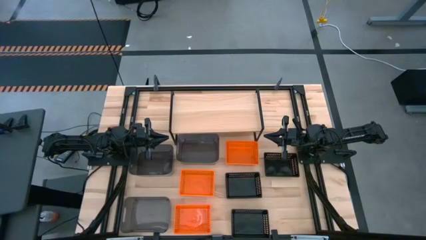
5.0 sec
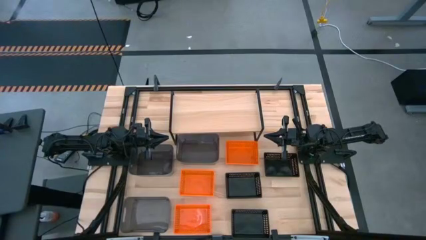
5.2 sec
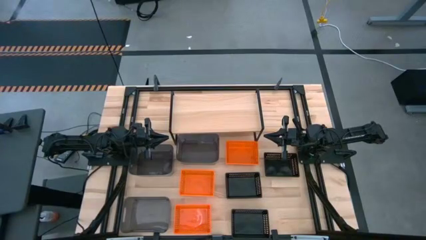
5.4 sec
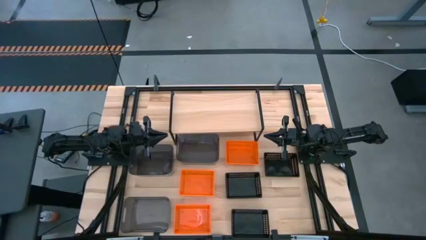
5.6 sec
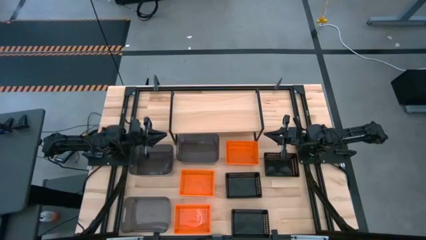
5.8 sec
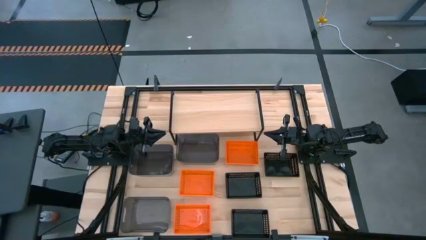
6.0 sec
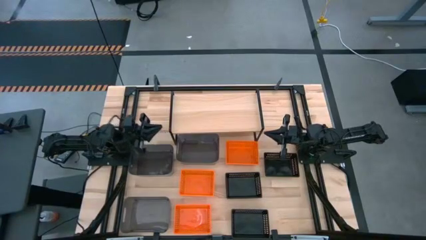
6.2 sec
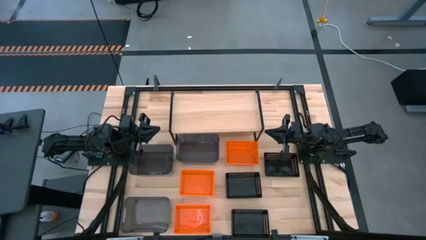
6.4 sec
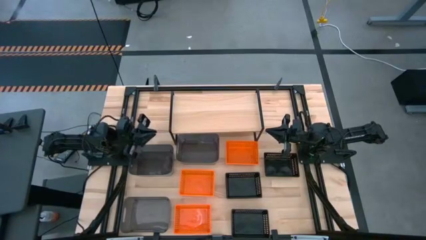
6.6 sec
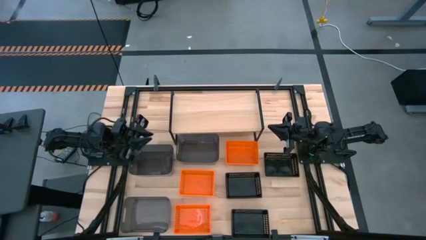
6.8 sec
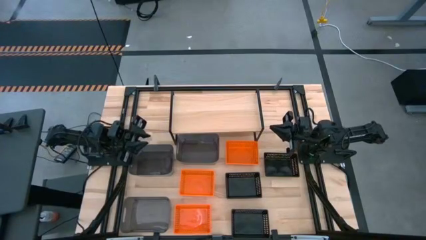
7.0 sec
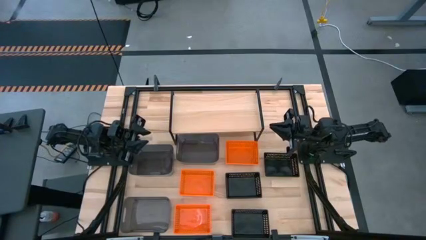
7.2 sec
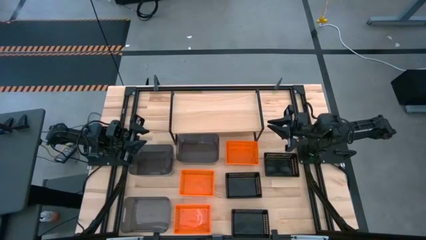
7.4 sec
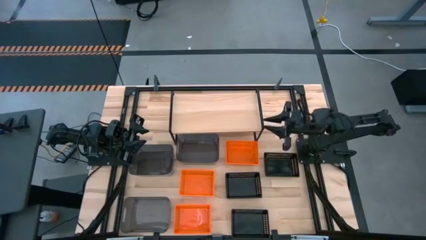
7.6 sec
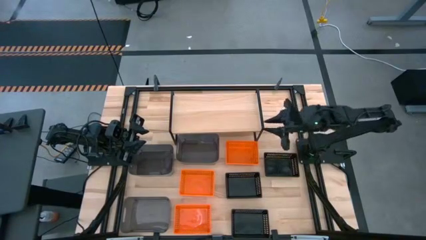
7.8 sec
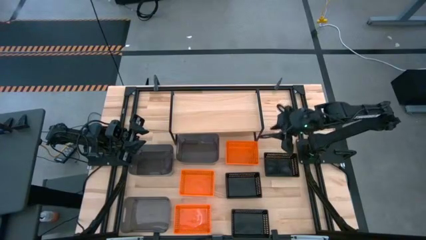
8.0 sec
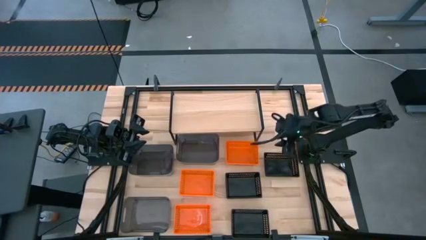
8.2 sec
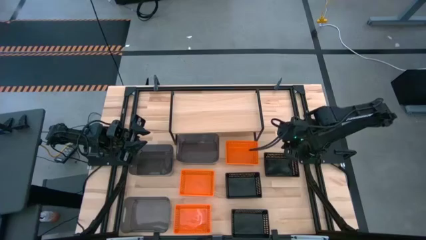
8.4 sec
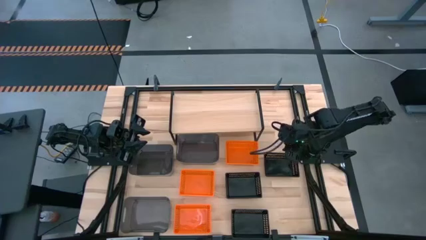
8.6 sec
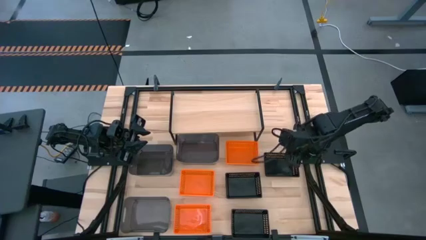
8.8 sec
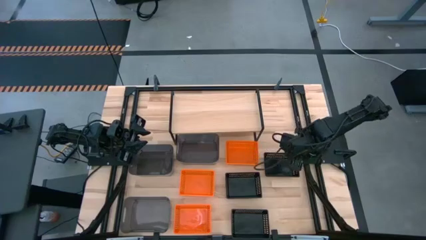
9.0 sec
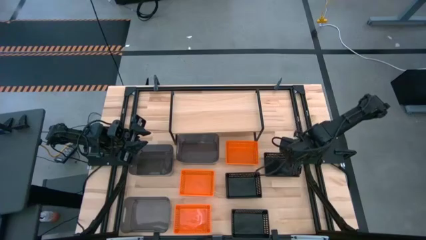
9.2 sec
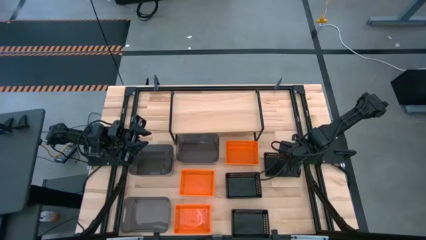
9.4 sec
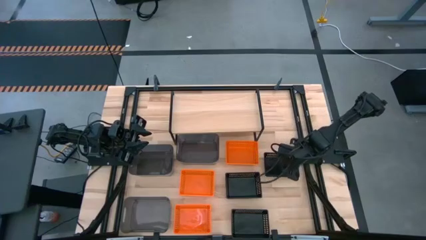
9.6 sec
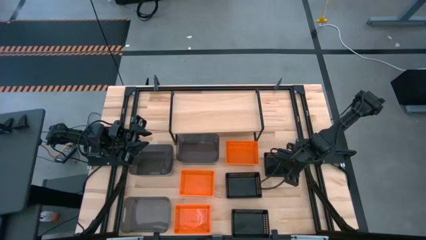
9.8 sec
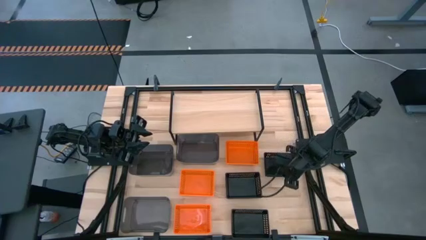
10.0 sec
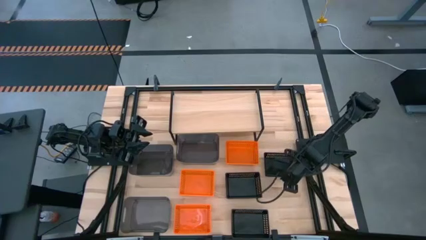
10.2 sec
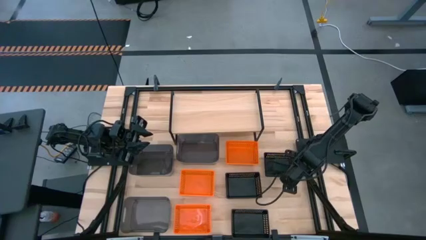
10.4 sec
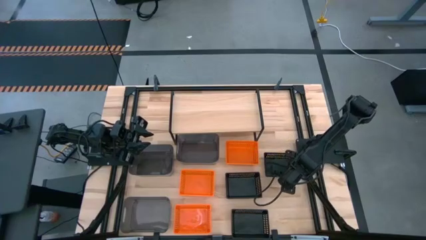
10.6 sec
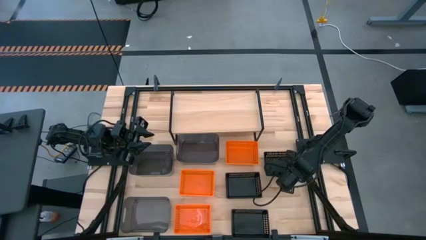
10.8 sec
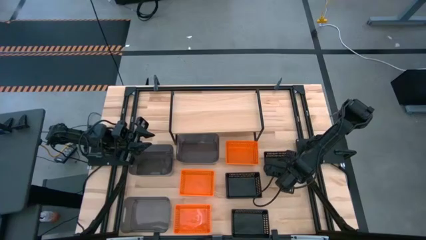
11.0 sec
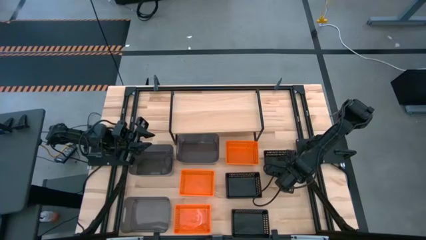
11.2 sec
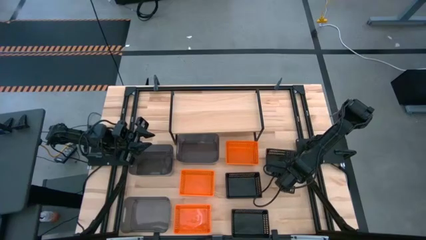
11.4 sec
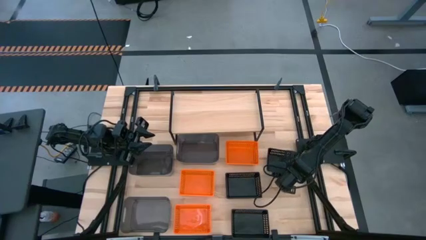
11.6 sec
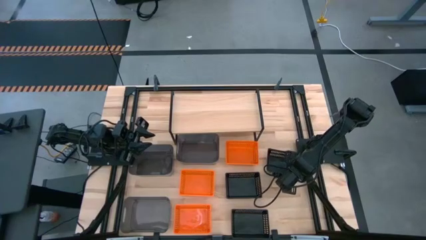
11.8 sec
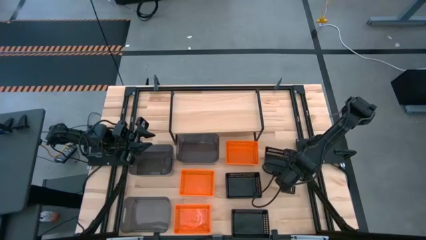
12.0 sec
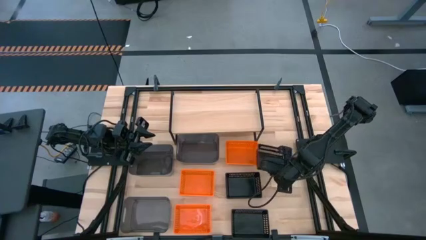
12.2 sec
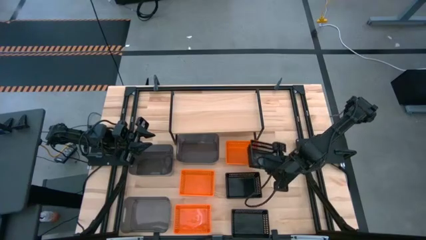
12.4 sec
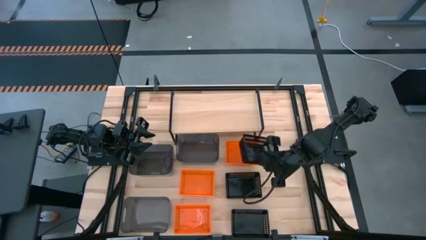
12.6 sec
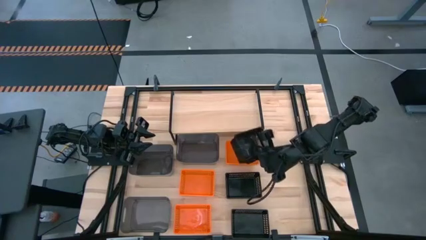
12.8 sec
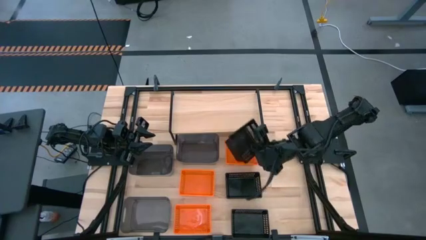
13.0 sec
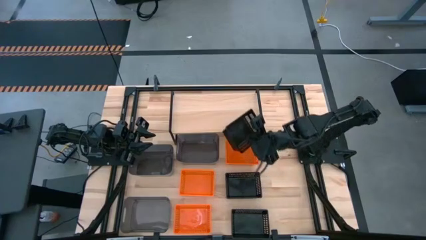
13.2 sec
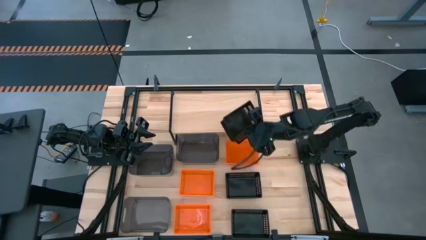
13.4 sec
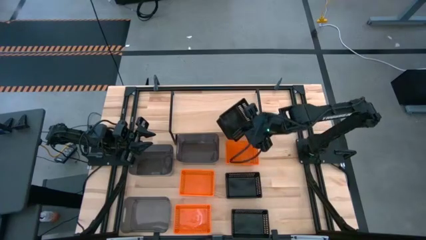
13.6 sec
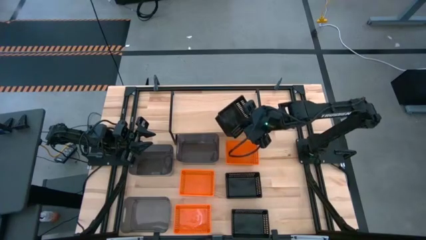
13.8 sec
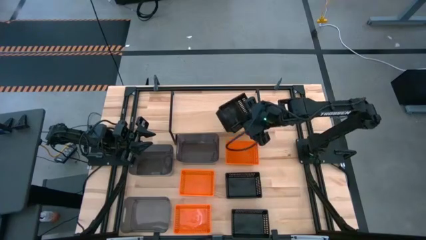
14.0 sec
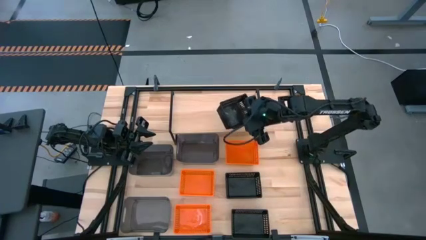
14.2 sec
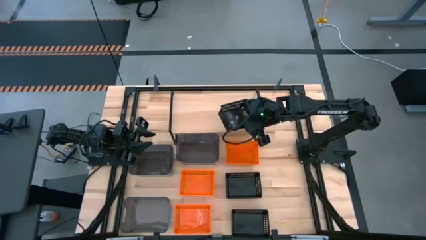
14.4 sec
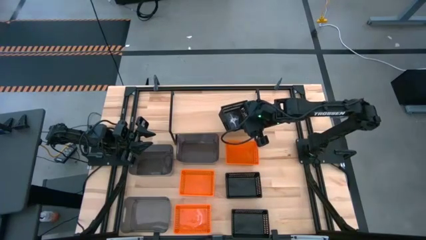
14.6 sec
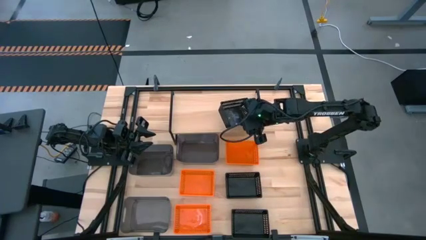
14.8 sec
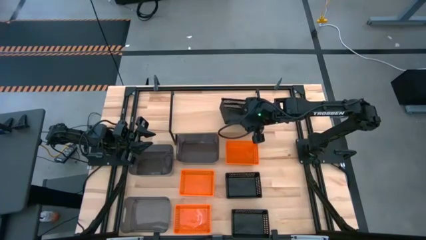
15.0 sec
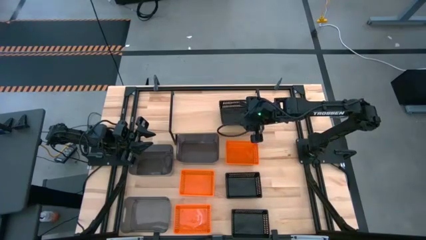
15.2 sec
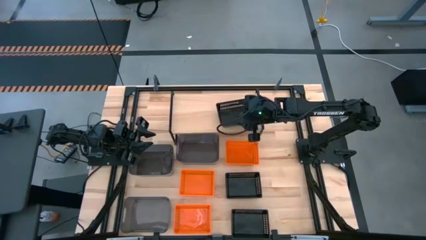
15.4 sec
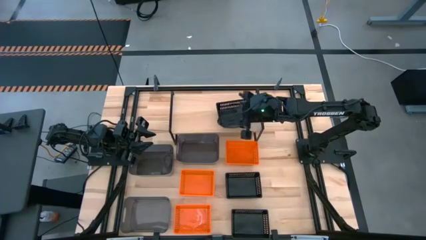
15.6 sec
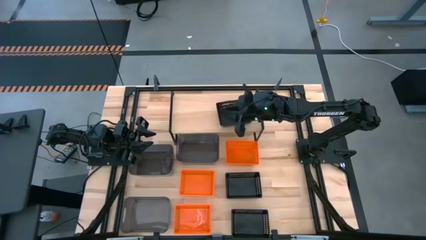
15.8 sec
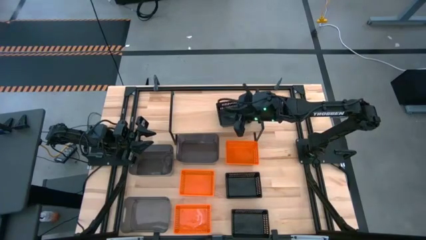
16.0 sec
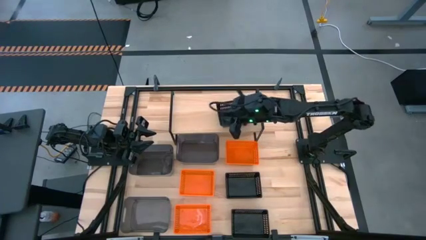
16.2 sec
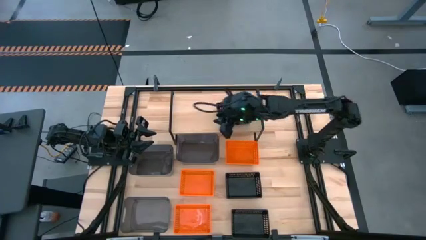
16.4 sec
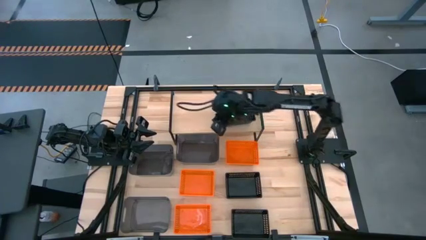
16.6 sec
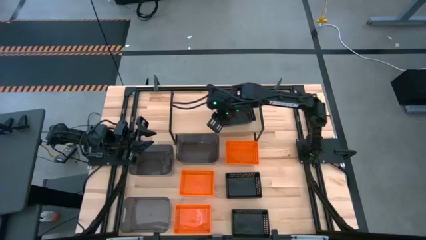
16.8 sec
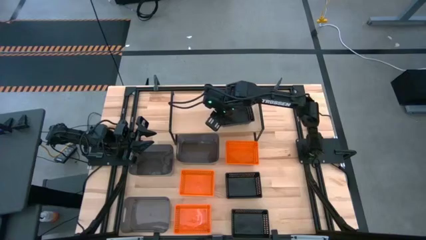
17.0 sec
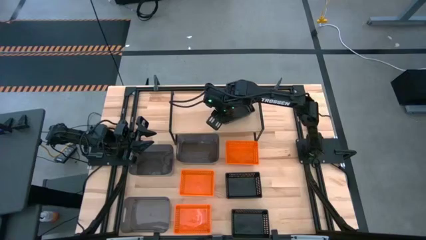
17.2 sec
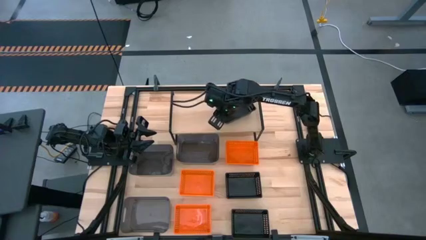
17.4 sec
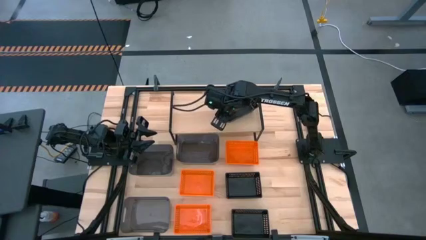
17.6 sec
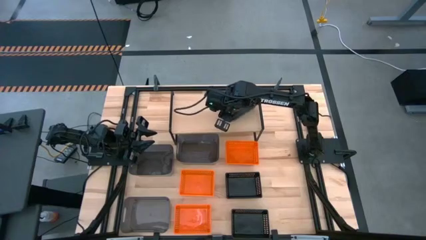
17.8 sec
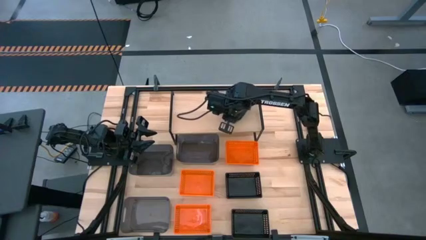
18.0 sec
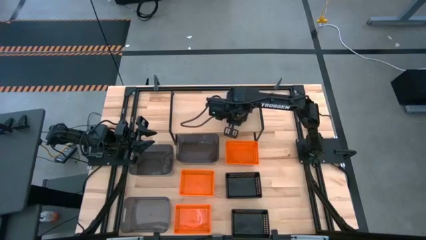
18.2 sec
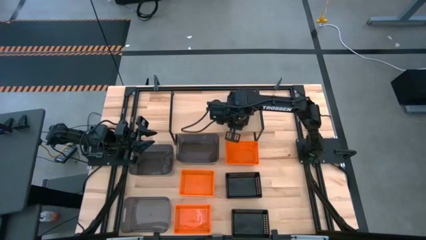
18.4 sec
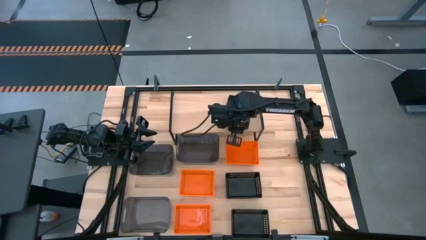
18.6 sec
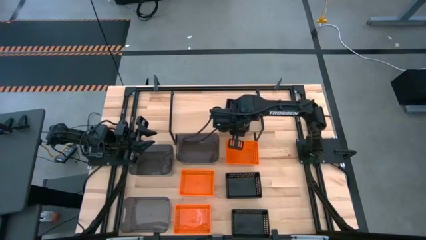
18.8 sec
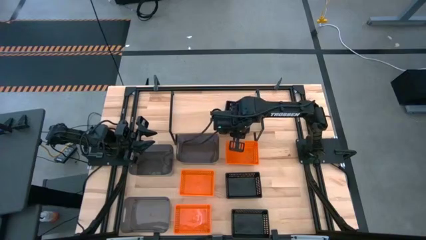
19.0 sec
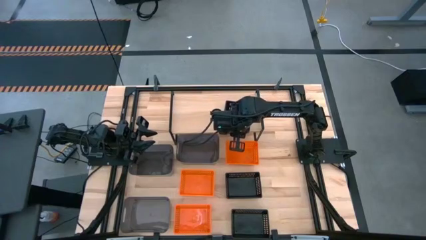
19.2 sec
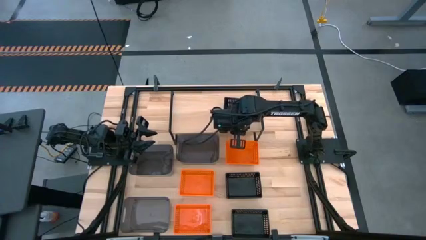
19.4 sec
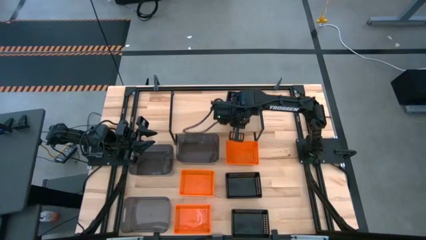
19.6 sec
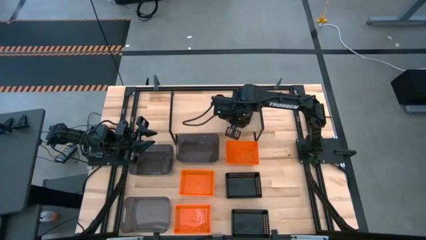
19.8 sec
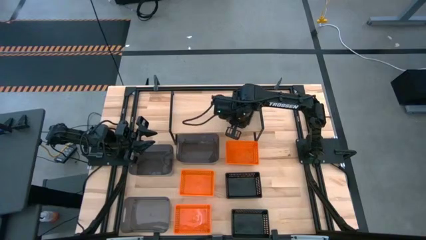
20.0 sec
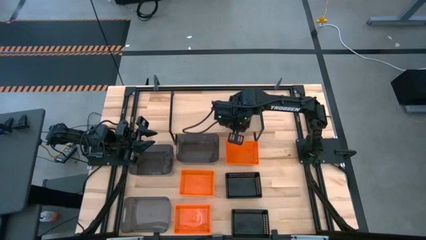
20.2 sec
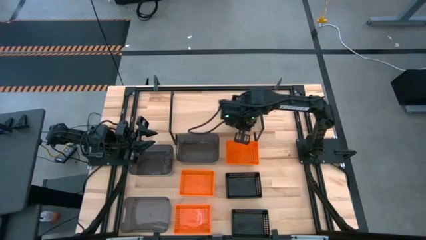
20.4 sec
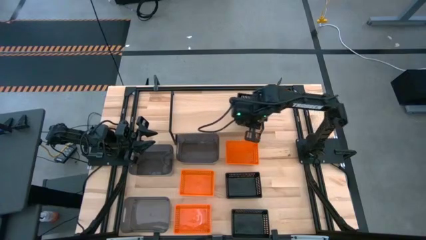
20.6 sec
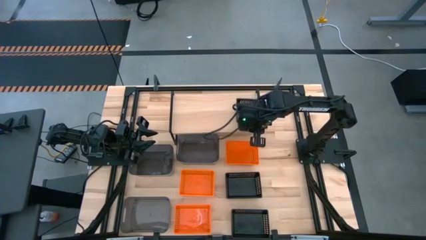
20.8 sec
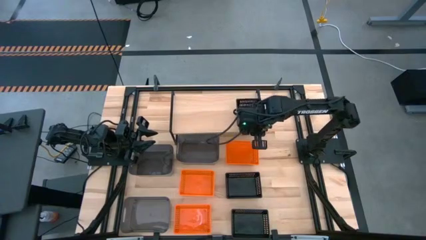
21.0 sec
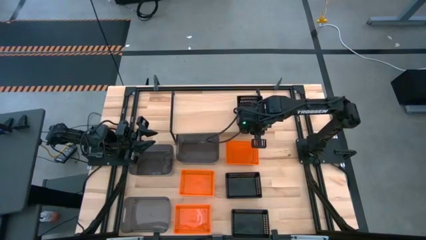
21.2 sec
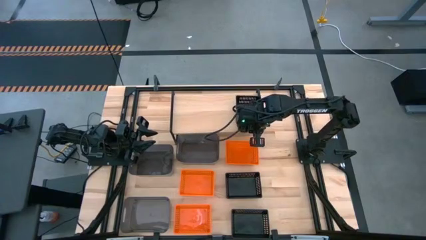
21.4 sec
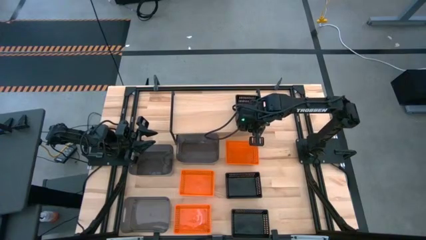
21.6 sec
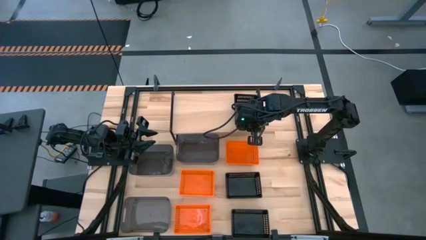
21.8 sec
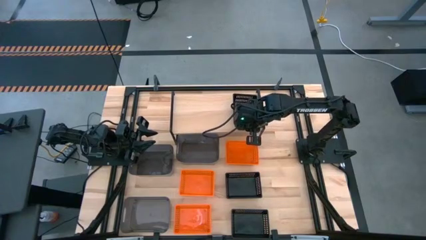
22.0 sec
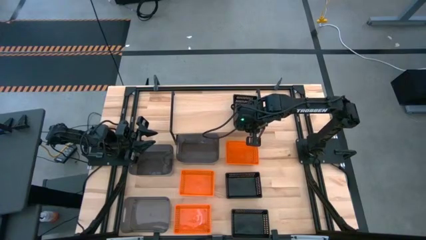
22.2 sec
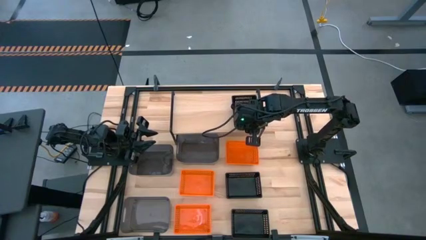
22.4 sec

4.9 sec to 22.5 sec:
Task: Stack baskets on shelf by color
Put the top black bin on the shelf
